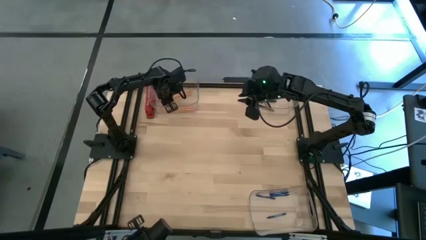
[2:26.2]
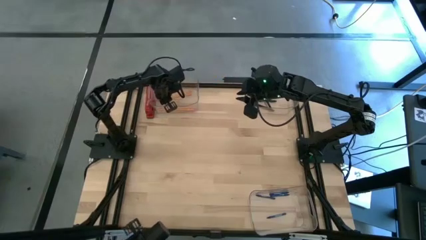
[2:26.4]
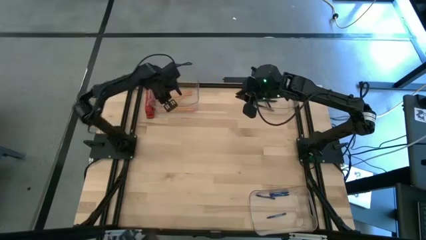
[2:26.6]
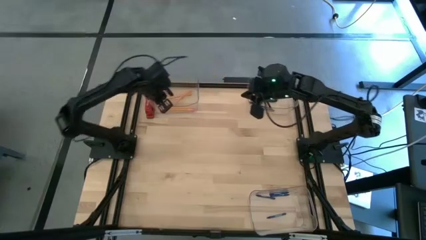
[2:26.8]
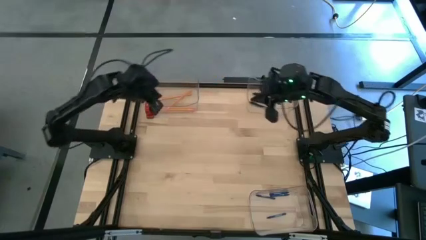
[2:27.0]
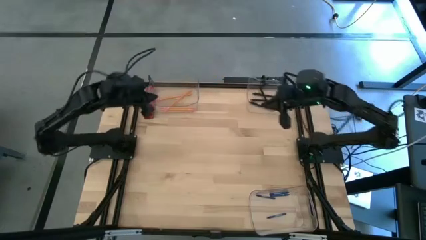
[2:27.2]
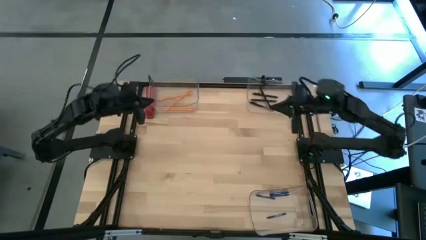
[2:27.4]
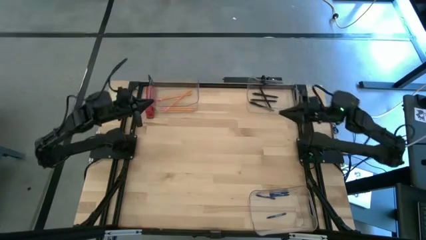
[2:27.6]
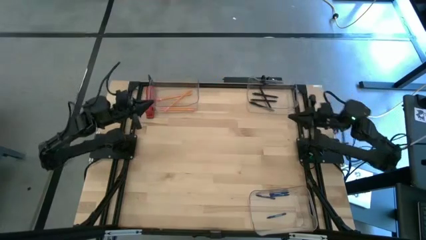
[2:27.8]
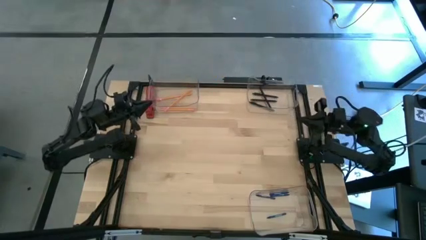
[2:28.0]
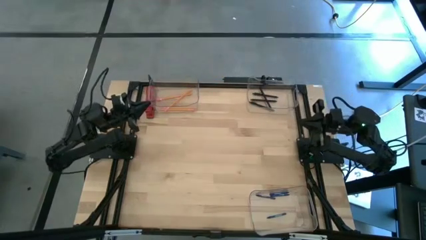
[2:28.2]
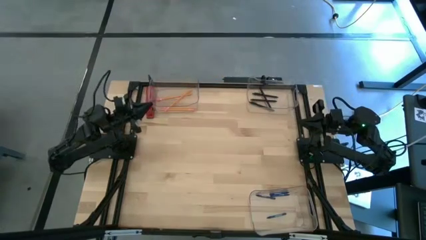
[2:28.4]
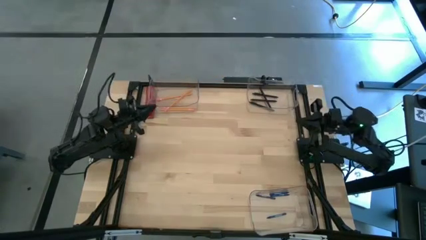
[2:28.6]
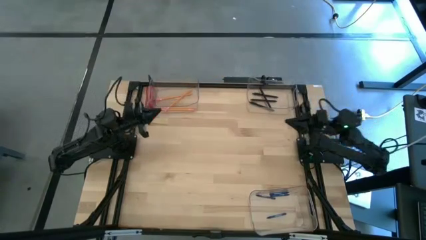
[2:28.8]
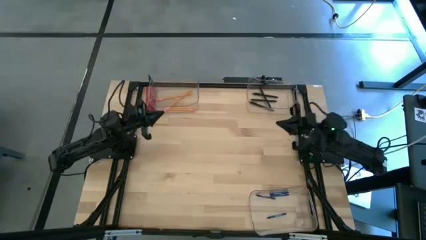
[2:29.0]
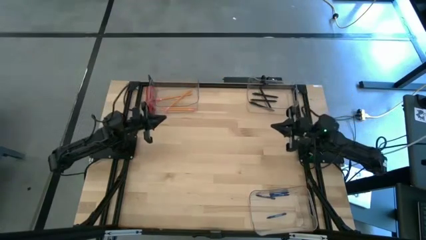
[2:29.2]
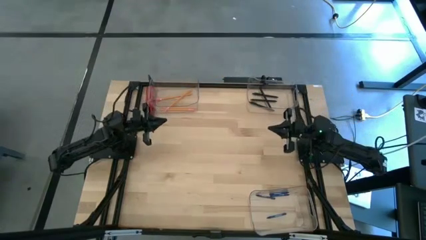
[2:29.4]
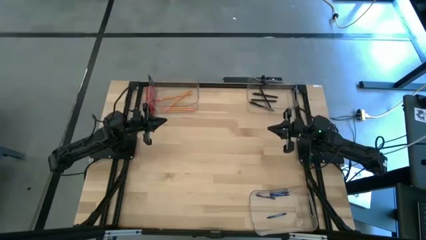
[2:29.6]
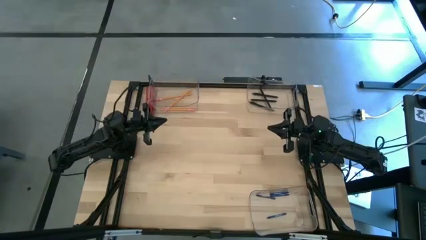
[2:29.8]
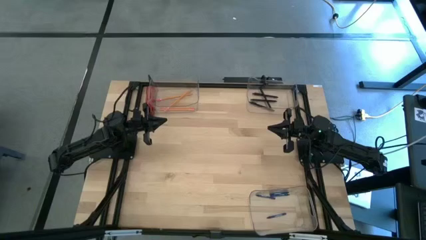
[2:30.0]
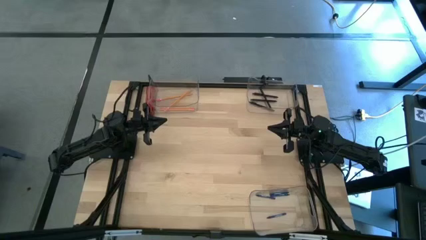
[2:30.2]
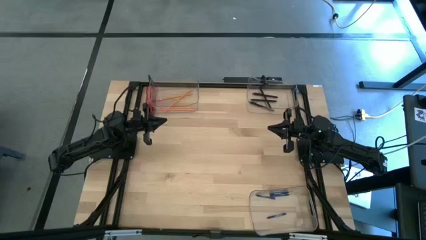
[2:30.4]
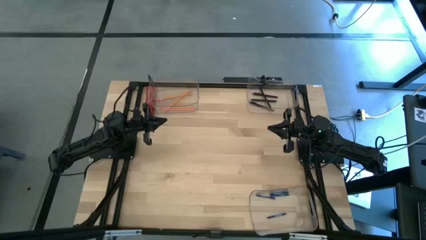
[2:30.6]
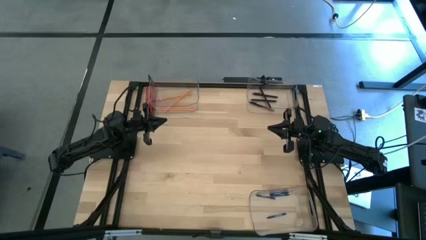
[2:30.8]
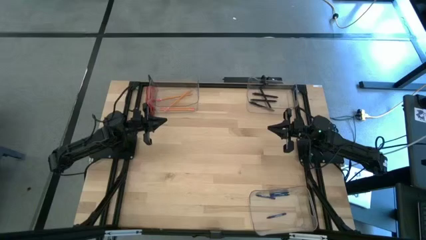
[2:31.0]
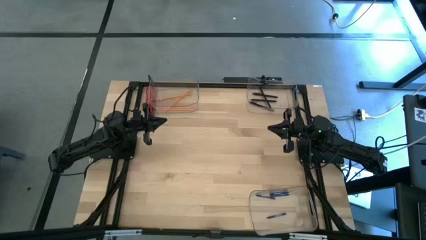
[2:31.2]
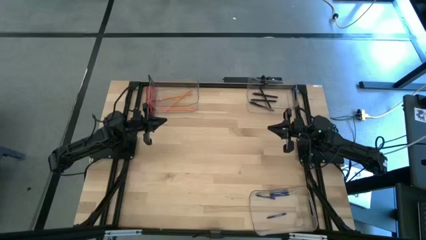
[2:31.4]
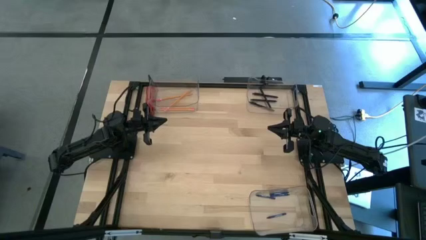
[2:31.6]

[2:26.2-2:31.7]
Task: Sort crayons/erasers/pens/pencils in bins
Return to Home Position

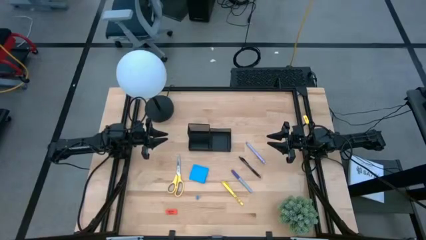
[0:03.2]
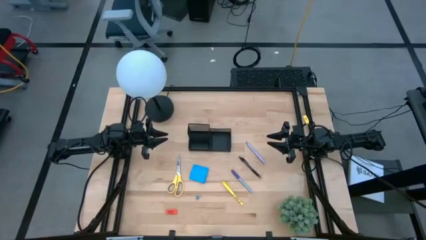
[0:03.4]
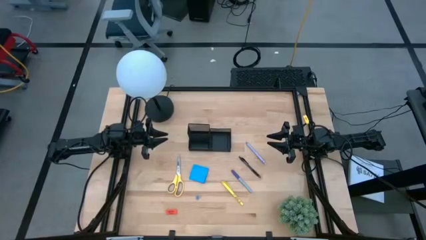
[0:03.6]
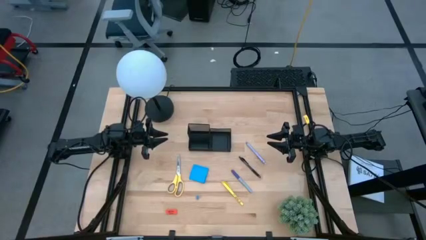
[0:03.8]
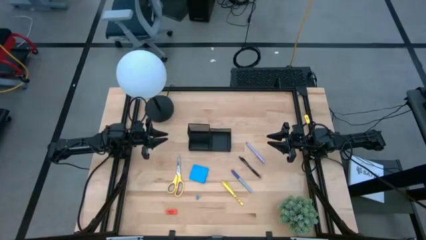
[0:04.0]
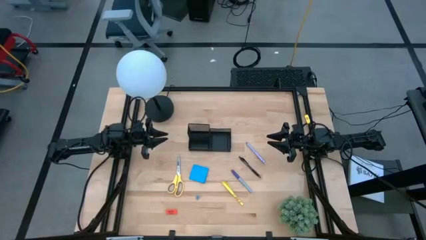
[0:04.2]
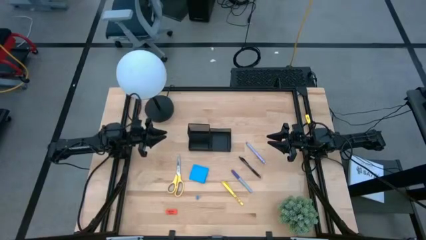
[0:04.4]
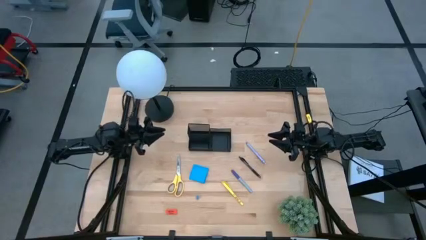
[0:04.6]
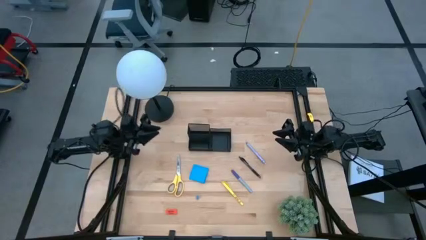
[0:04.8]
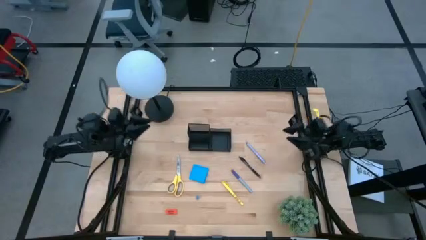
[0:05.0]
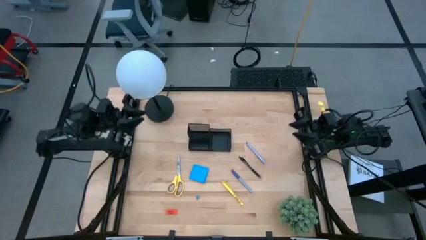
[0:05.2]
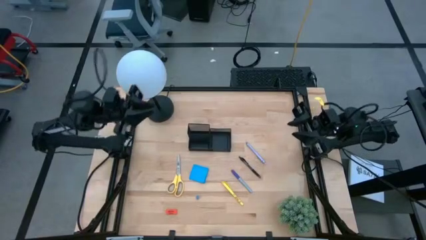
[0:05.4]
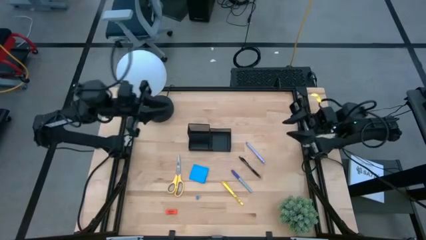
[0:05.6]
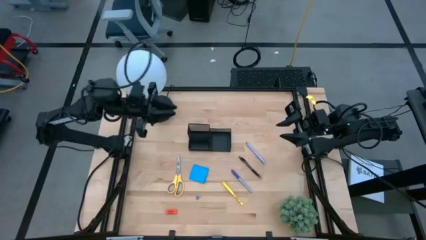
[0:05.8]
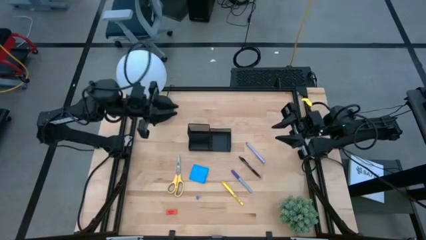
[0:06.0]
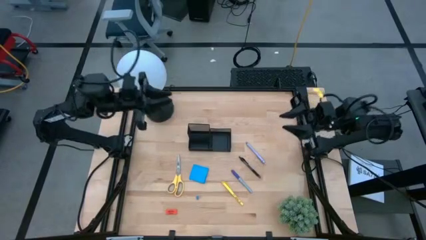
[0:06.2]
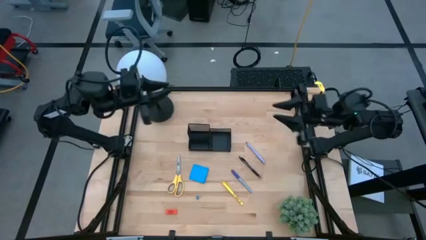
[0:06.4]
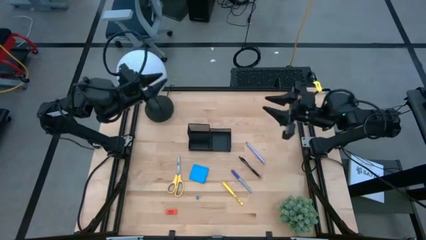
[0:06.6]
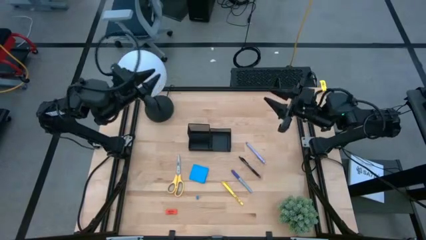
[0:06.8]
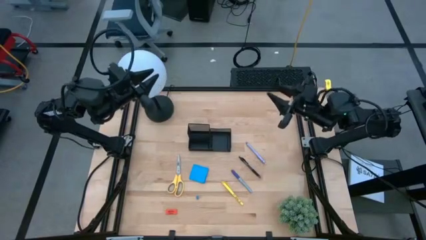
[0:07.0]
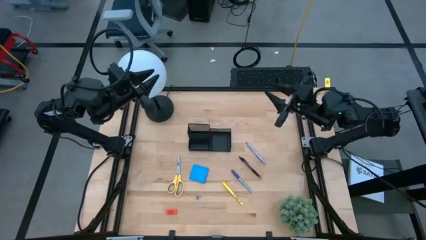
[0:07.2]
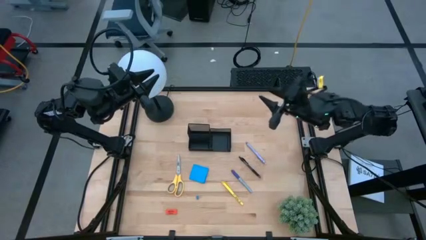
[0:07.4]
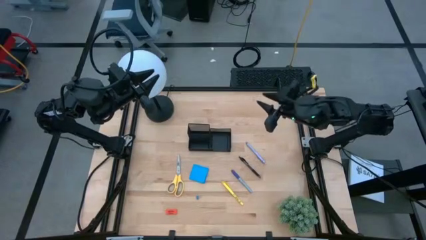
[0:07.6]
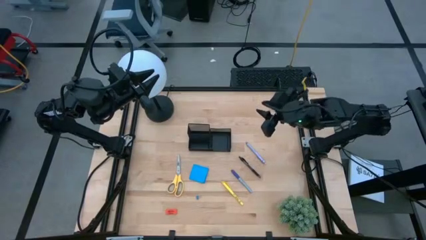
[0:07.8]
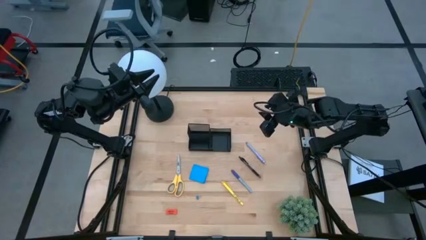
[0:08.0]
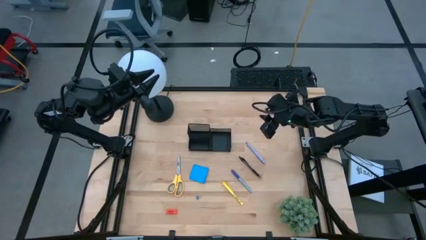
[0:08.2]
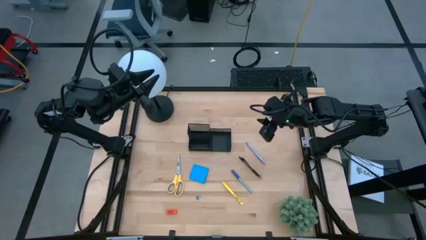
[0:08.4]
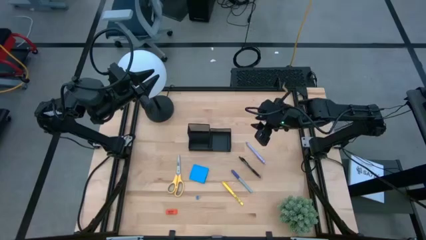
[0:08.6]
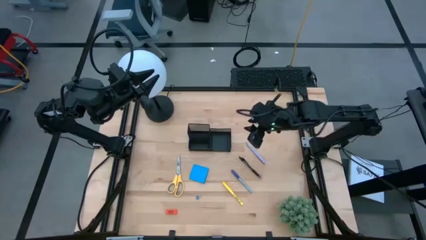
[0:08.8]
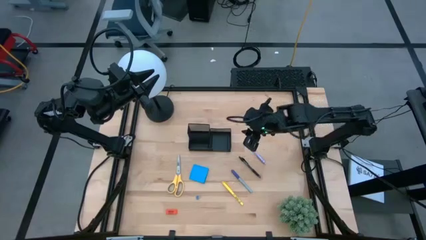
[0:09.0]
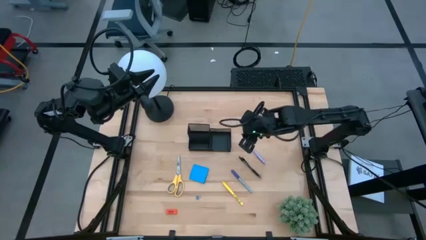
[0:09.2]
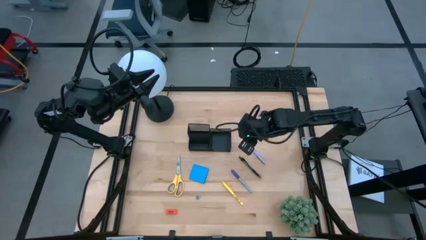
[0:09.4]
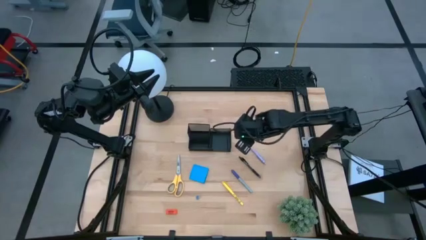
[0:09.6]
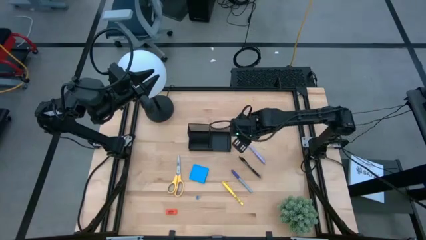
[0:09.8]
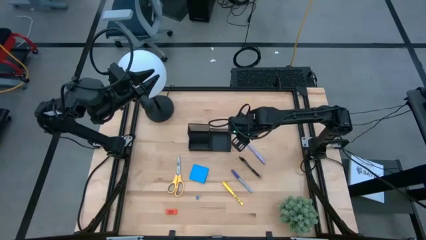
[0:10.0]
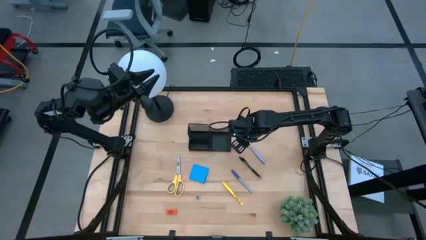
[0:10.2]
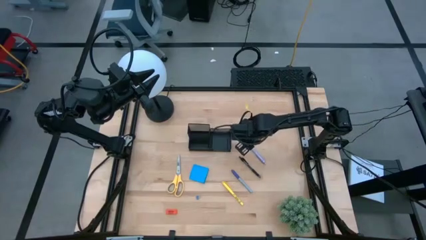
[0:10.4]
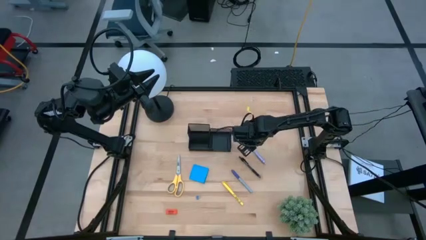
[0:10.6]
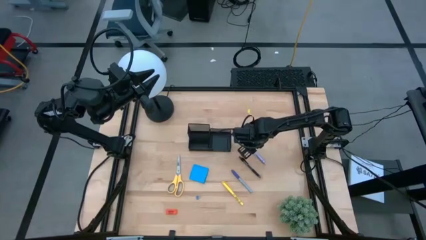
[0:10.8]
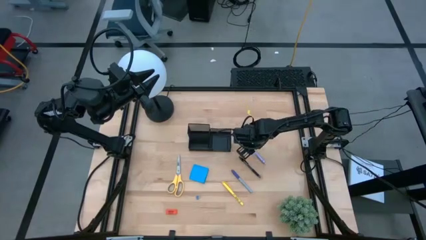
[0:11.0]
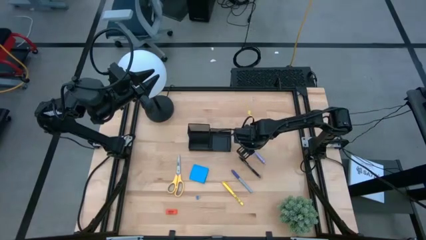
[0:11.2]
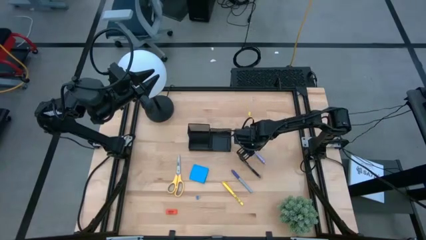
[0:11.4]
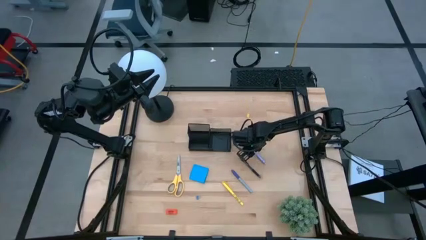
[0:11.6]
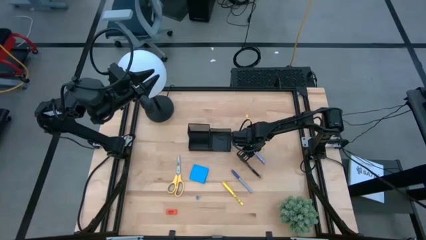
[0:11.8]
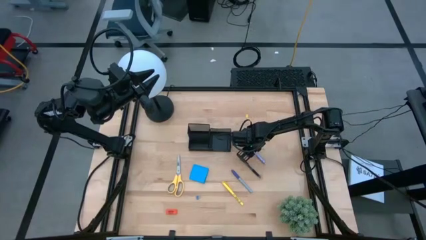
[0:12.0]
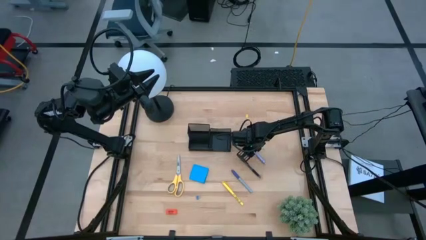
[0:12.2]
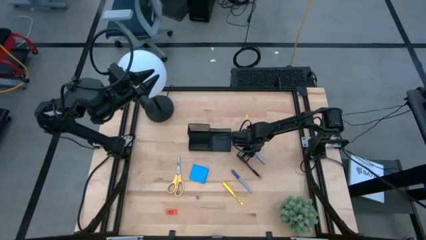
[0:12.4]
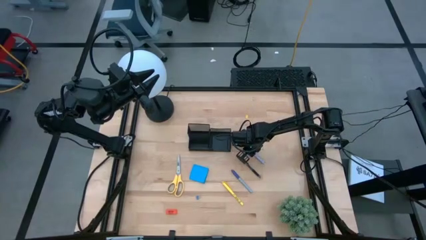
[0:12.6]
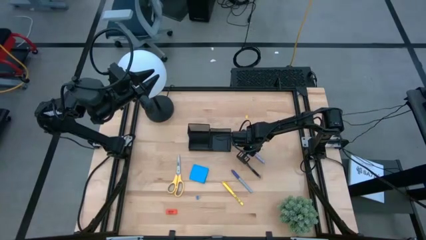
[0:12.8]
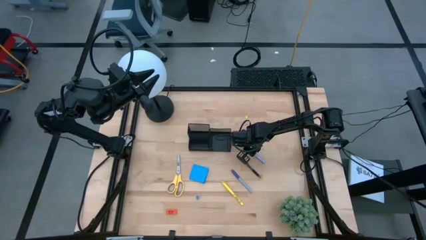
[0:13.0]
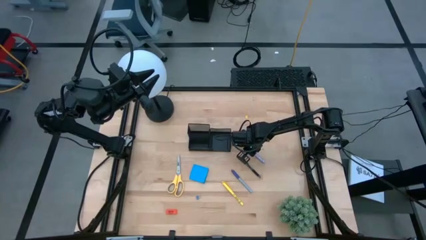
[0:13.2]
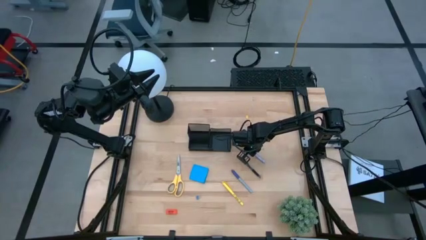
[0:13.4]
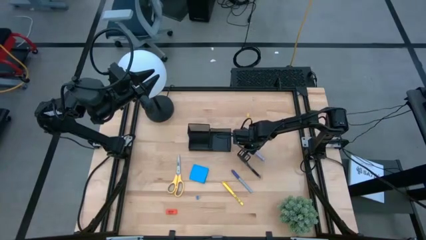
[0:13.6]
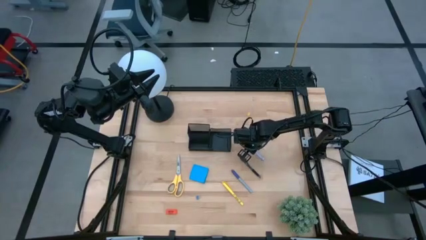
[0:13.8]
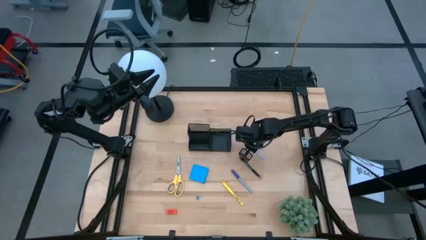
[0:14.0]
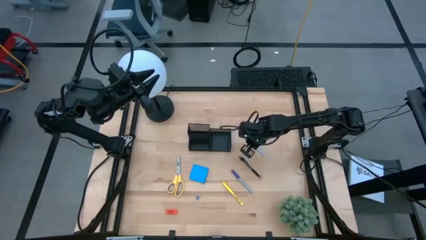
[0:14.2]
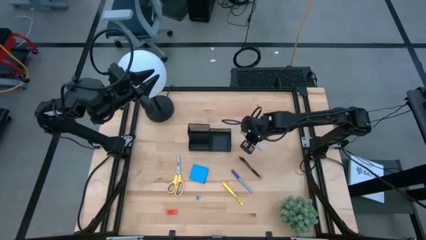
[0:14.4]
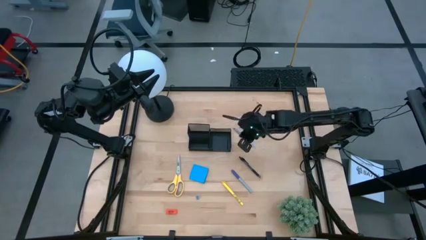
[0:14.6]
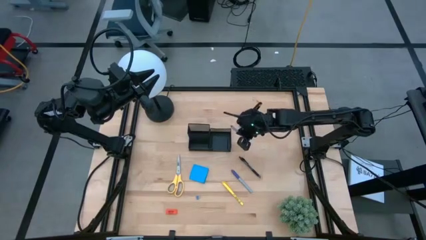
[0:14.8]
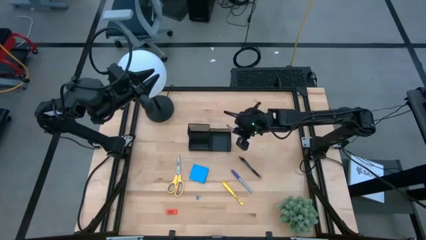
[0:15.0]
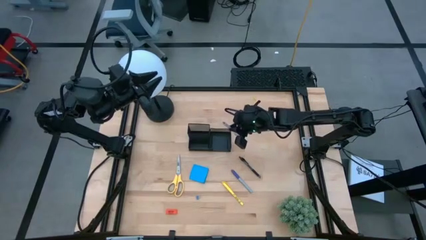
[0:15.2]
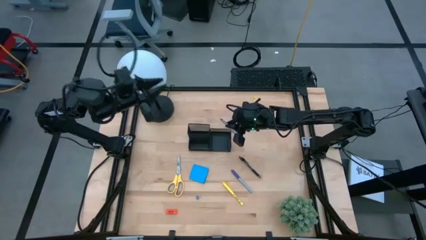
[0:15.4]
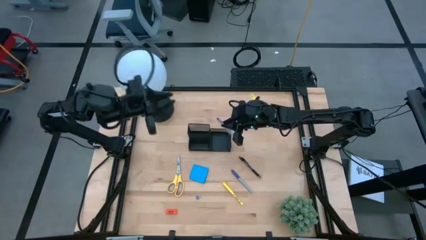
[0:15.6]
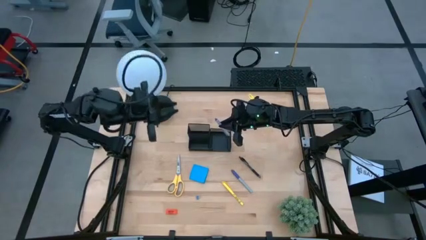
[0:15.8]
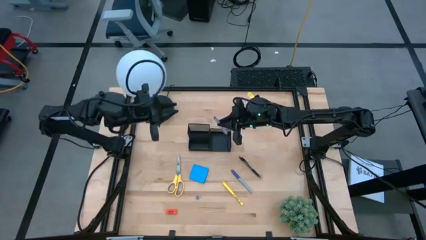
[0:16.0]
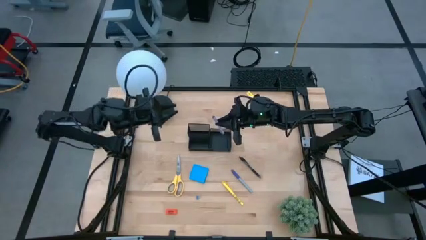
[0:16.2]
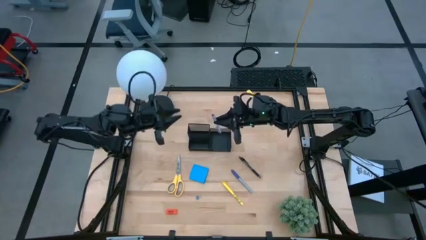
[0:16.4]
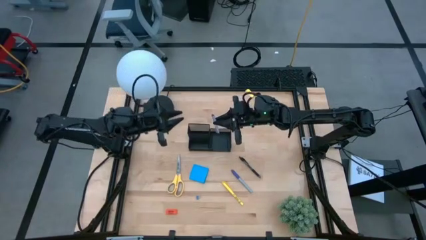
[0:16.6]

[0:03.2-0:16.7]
Task: Pick and place office supplies into organizer
Put the purple pen into the black mesh desk organizer
